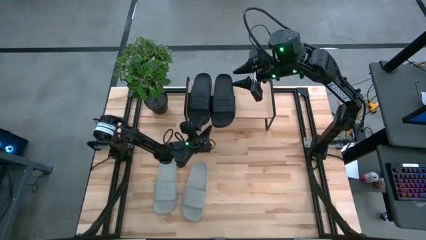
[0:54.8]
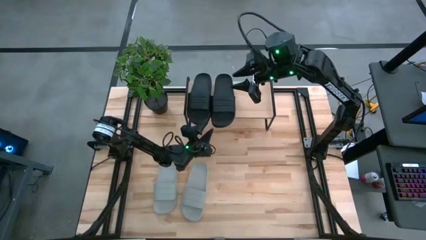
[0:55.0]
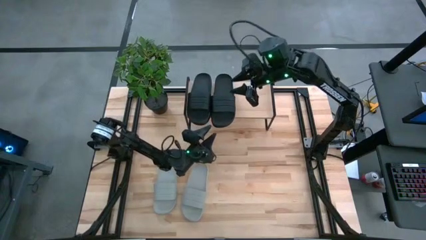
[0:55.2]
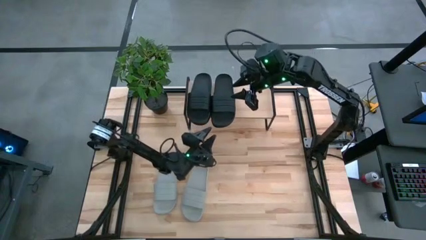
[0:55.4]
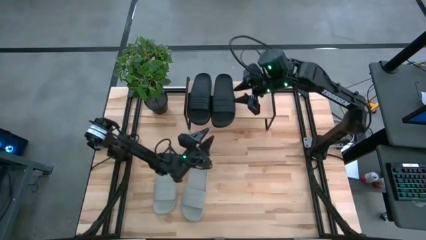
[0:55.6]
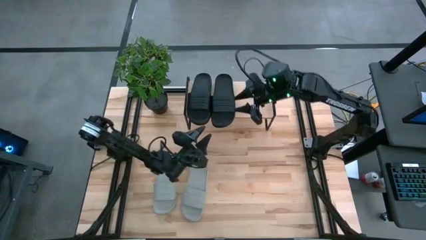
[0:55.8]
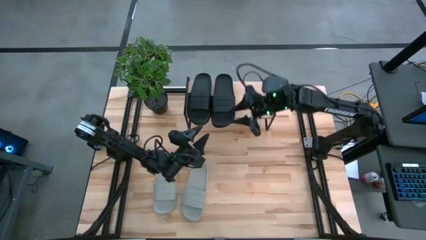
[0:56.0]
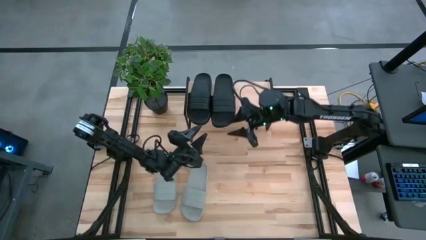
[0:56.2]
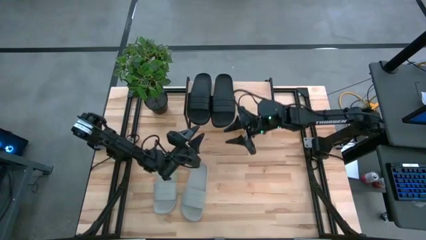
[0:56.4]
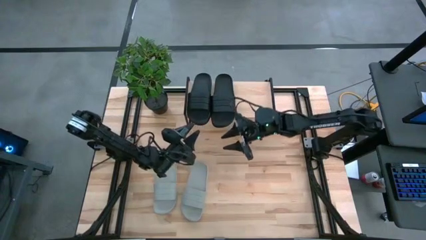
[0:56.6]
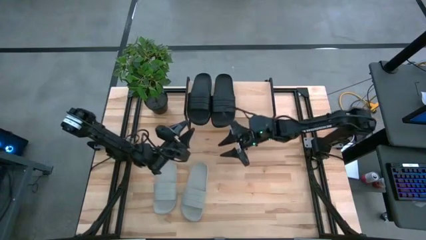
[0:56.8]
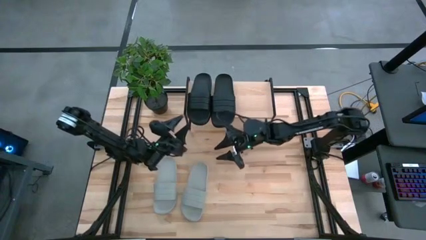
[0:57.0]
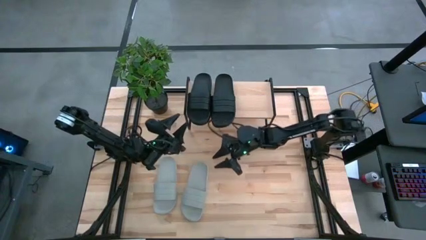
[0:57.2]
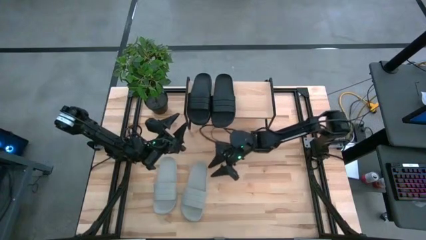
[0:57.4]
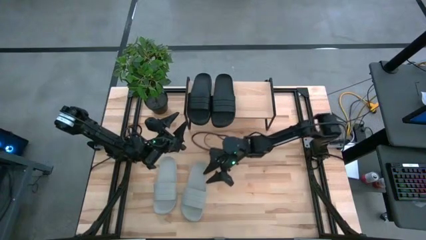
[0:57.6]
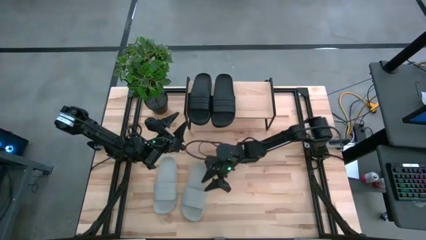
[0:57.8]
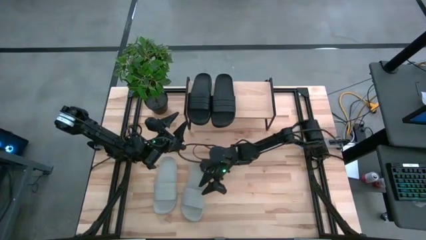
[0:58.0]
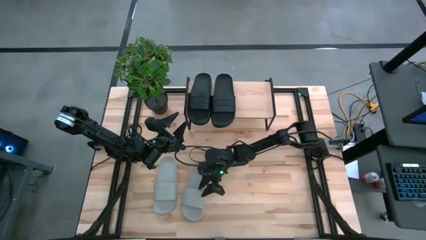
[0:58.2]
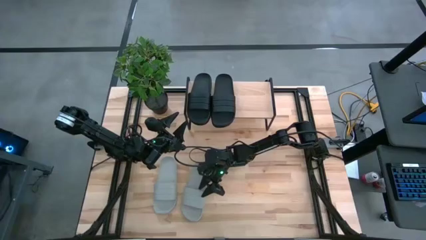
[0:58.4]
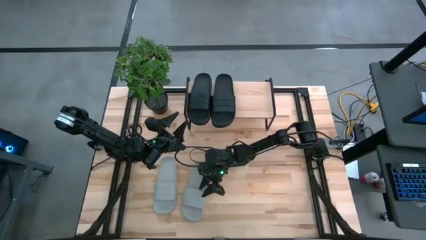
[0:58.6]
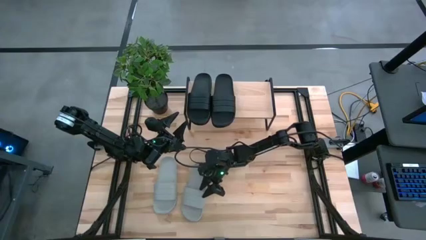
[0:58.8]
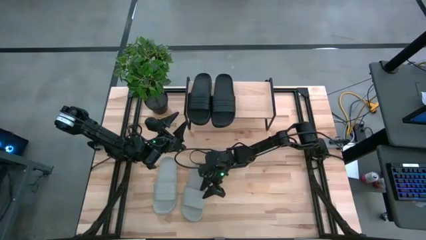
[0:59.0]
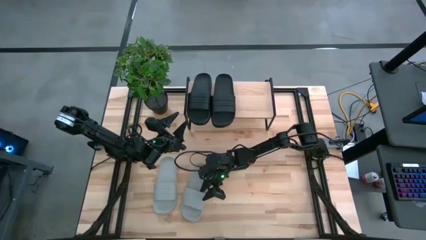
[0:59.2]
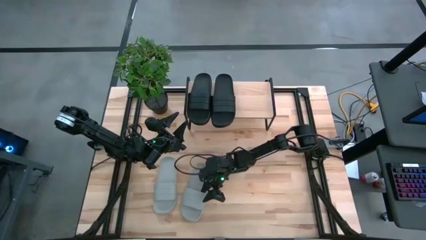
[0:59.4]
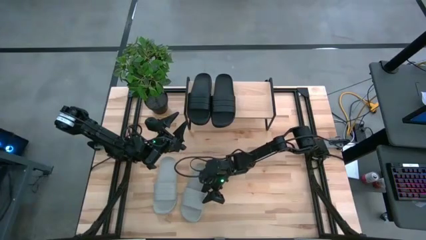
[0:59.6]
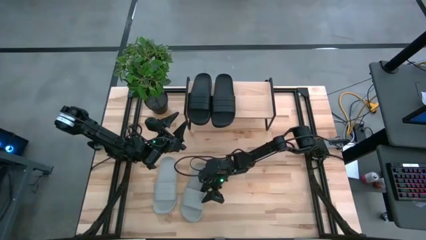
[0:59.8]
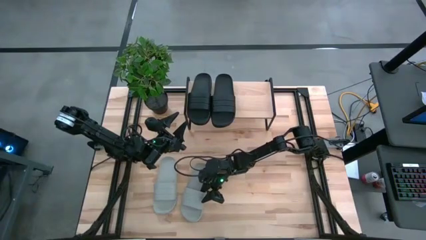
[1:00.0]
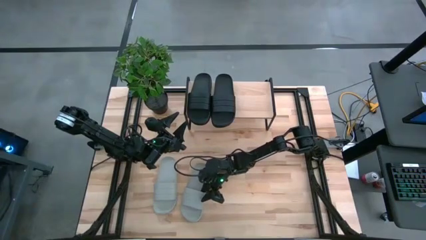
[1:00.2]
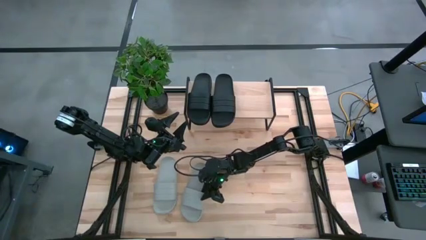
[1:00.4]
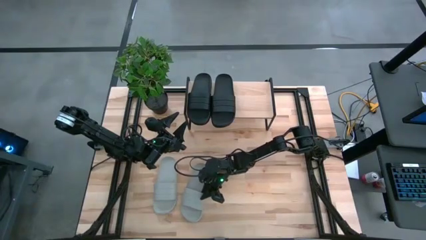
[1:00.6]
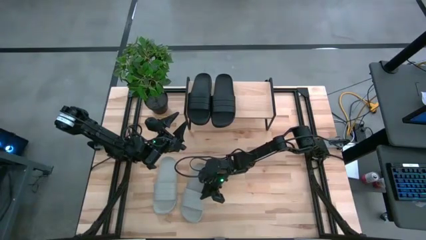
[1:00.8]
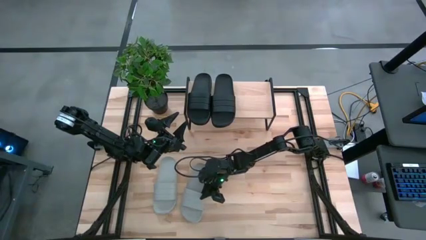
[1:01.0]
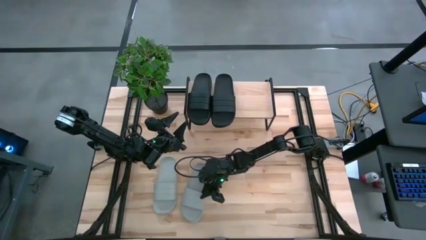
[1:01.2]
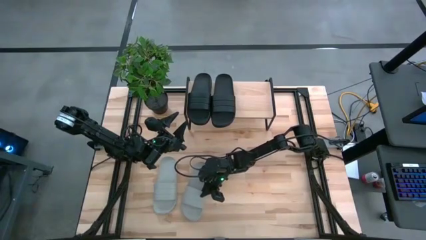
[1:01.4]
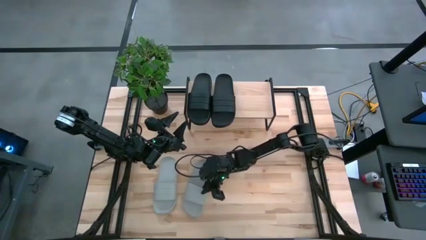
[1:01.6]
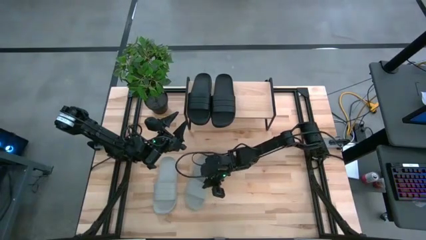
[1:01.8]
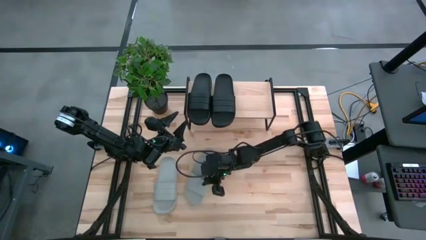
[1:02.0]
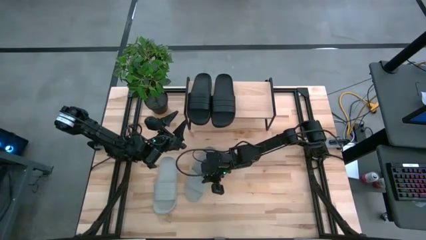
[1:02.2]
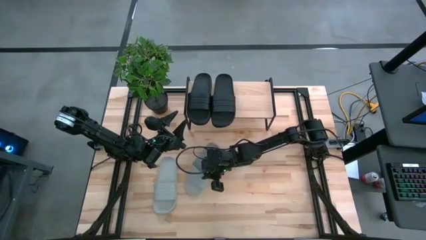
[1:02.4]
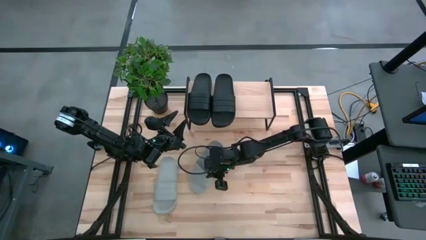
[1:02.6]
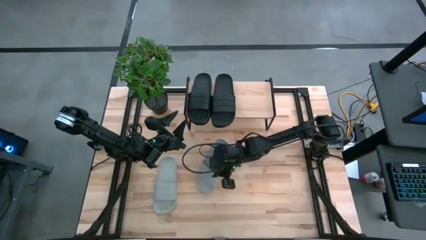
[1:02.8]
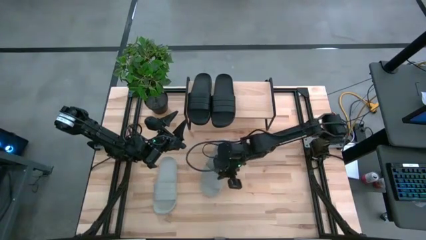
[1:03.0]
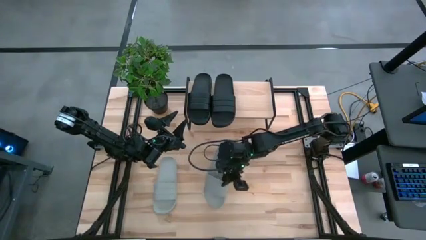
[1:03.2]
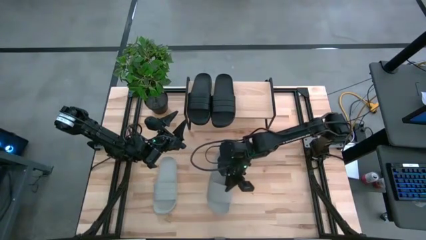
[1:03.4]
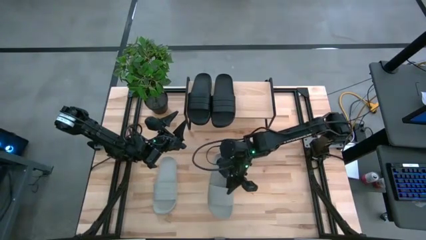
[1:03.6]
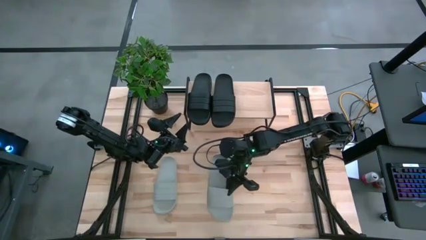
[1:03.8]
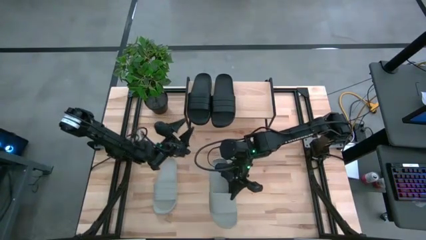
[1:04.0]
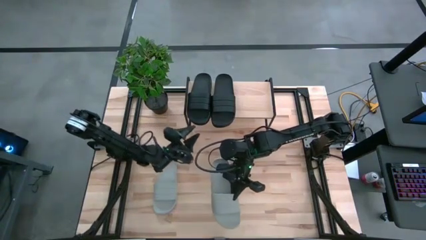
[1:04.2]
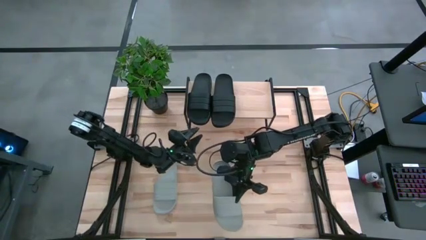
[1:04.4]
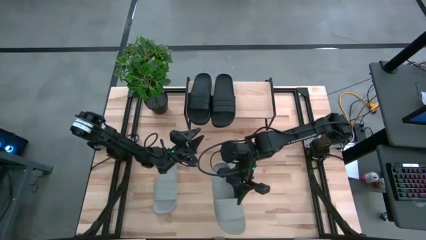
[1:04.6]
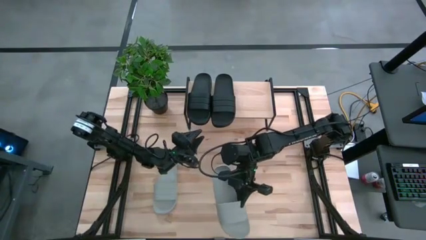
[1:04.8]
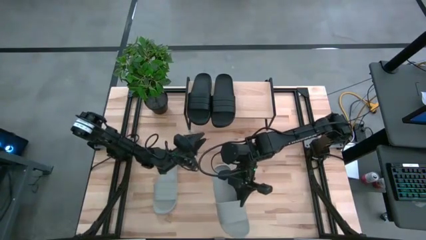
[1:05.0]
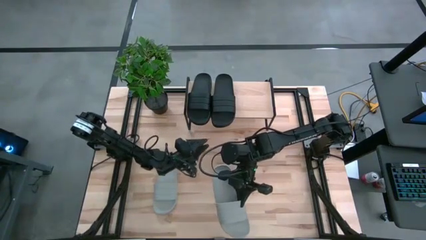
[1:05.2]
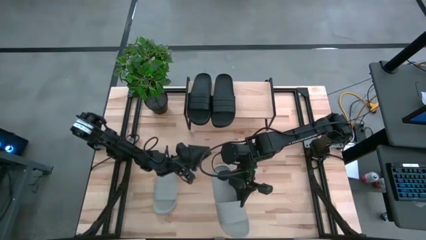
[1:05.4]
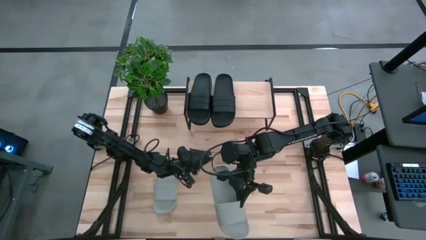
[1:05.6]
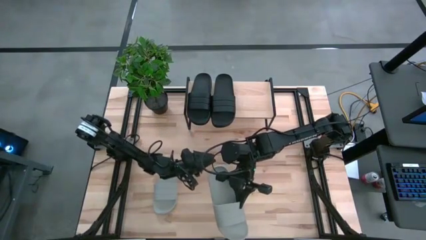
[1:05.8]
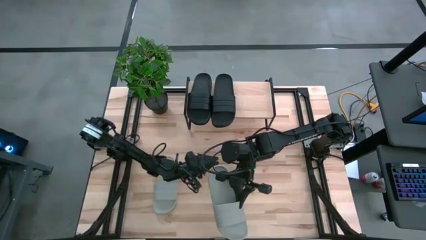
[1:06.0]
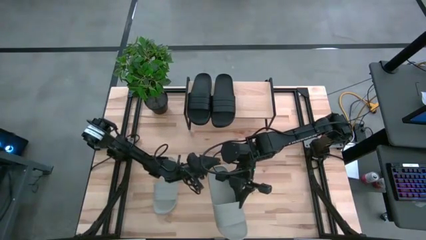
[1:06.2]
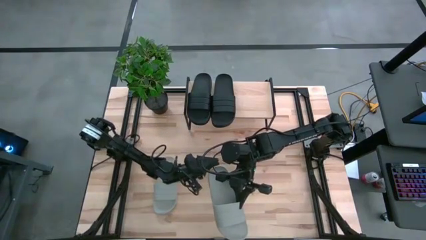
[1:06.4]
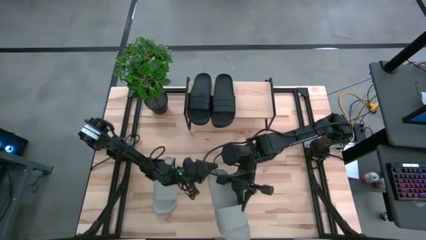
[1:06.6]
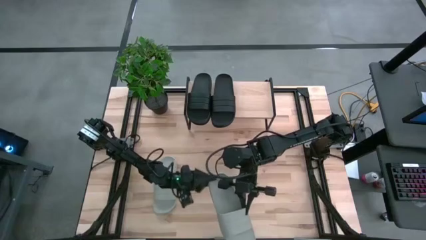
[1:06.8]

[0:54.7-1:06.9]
Task: Pick and place slides into the shelf
Put the right gray slide on the shelf

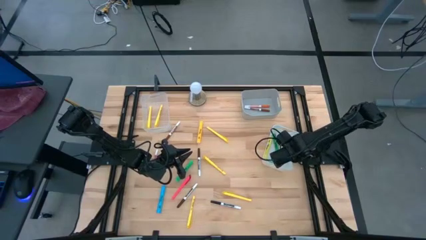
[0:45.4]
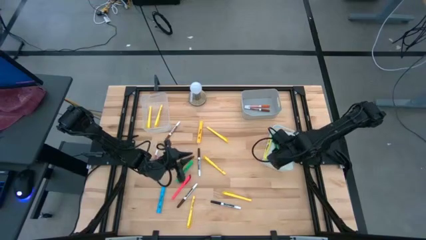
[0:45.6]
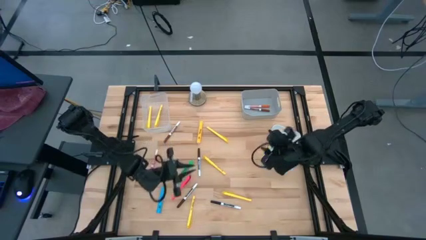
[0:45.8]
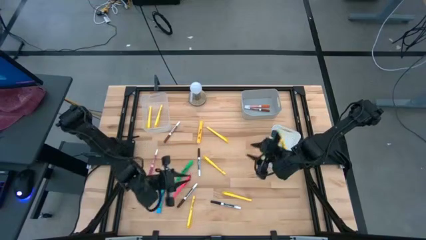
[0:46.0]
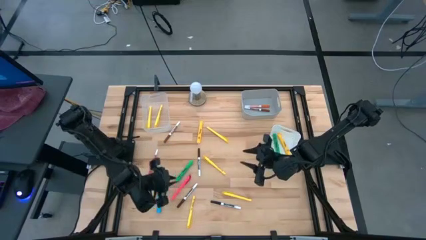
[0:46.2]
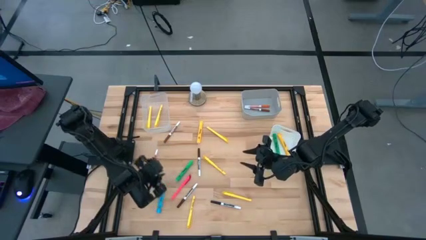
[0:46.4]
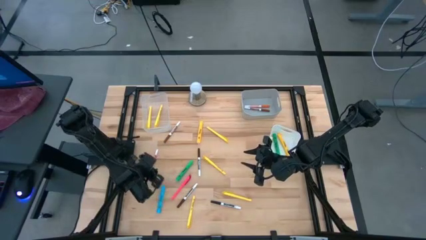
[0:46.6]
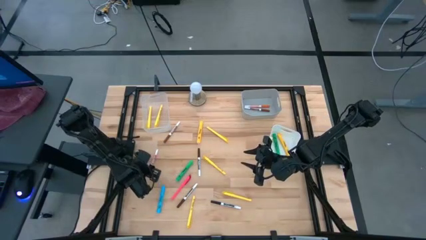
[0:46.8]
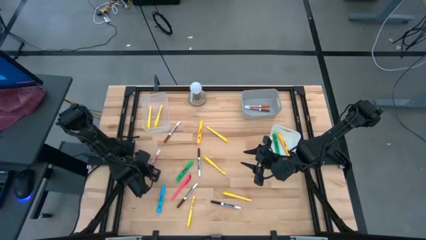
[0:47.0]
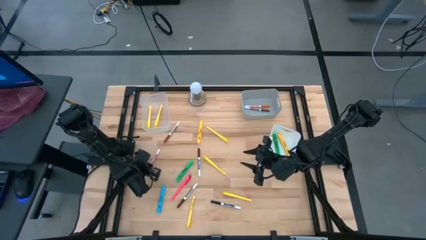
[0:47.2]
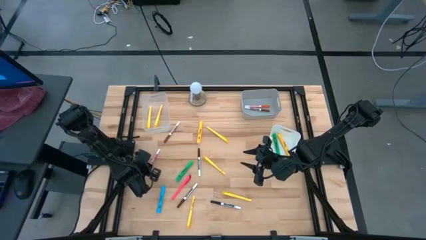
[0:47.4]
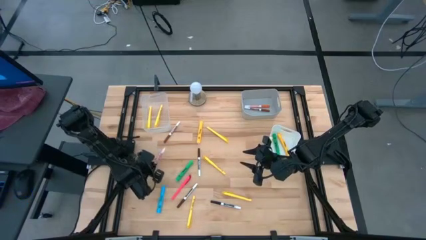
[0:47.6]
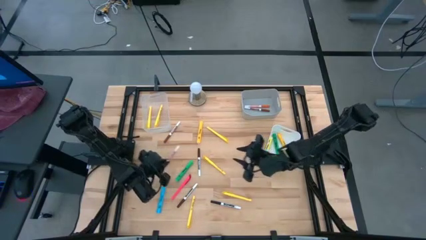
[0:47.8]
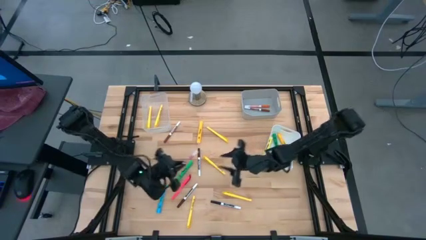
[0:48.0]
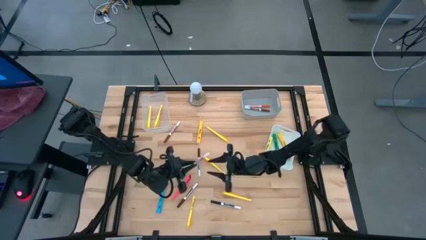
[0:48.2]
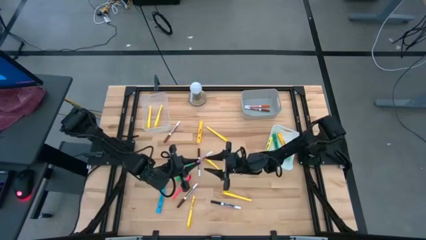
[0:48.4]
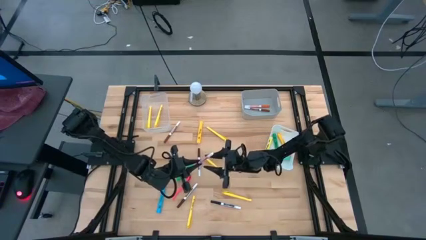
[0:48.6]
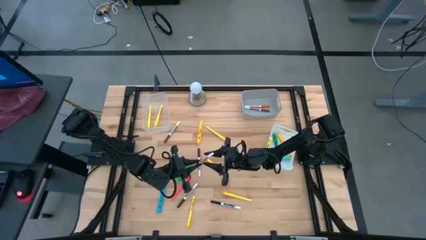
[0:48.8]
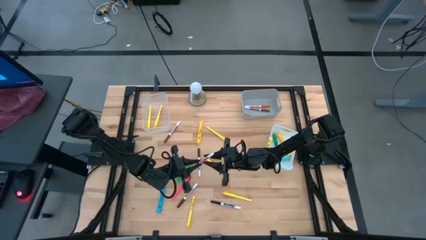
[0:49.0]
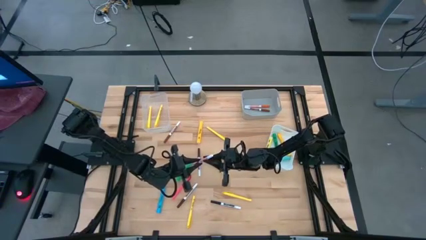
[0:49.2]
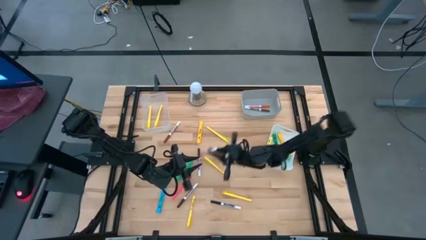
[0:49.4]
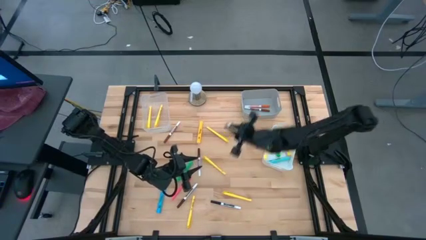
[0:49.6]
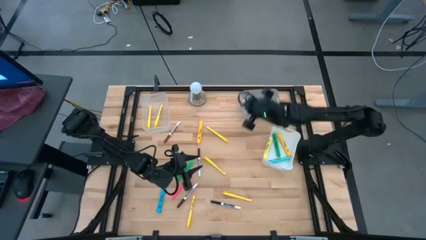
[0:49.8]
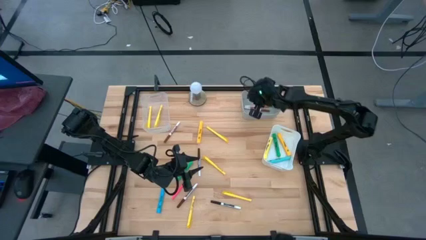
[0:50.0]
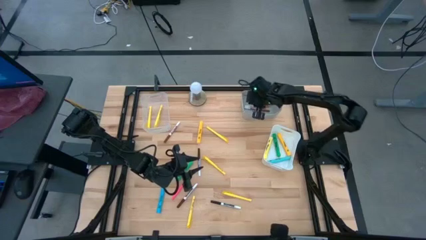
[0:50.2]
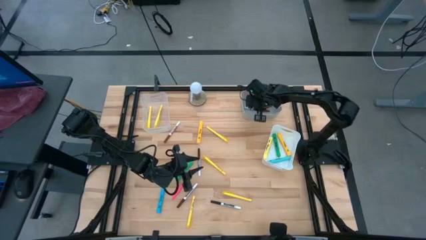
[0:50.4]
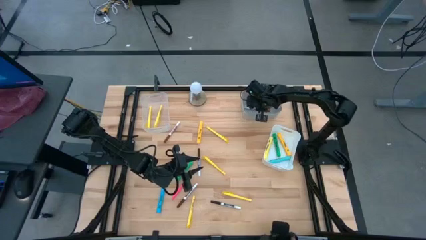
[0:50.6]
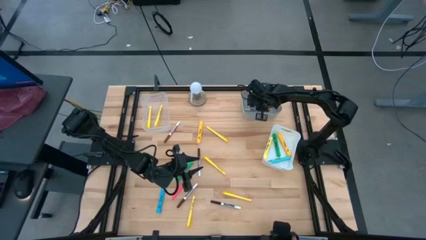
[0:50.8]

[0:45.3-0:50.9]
Task: Pick & Place Markers
Put the pink marker pen into the gray bin
